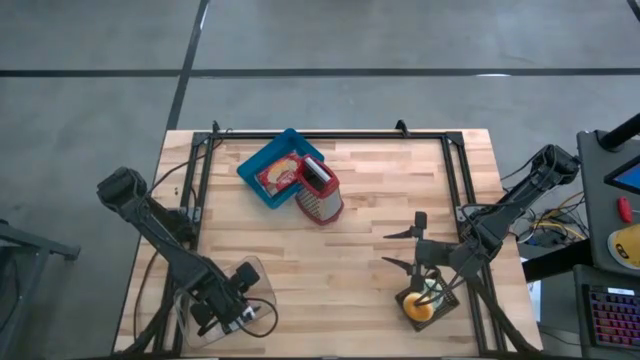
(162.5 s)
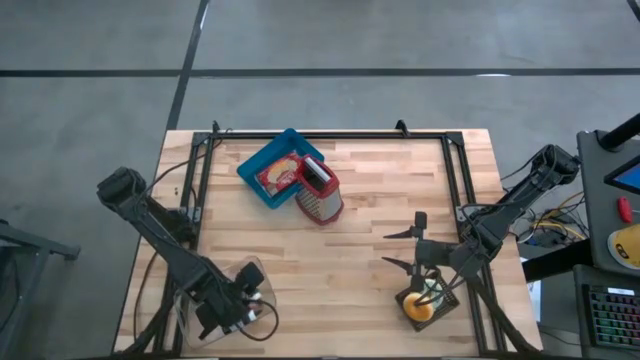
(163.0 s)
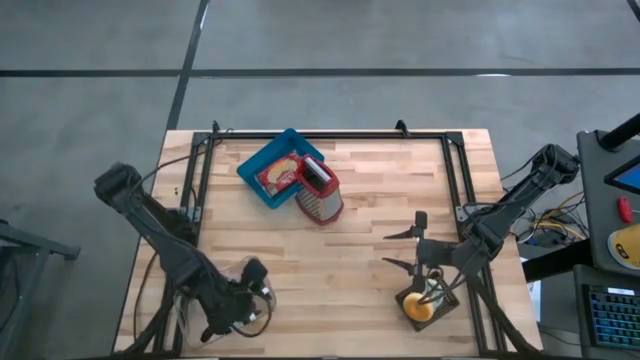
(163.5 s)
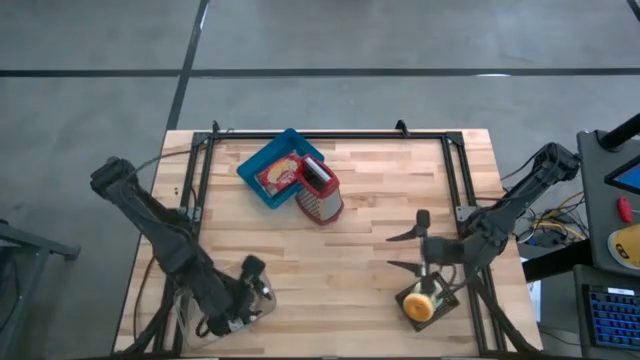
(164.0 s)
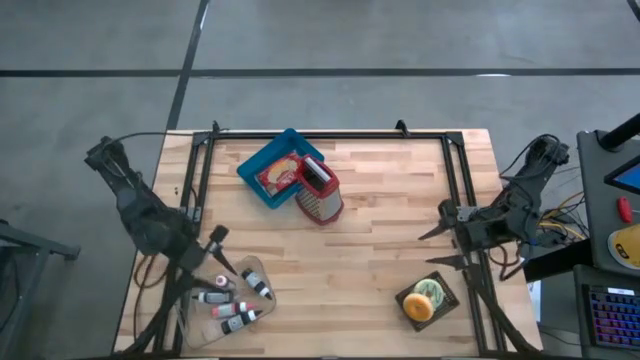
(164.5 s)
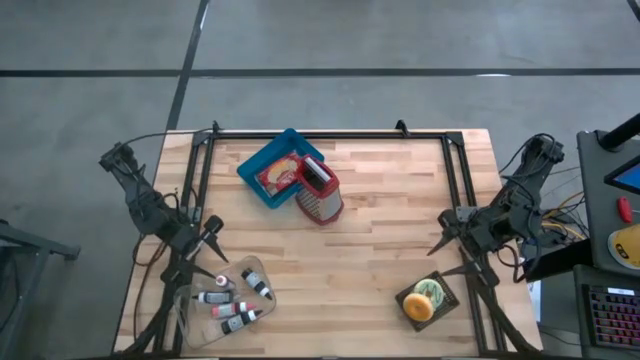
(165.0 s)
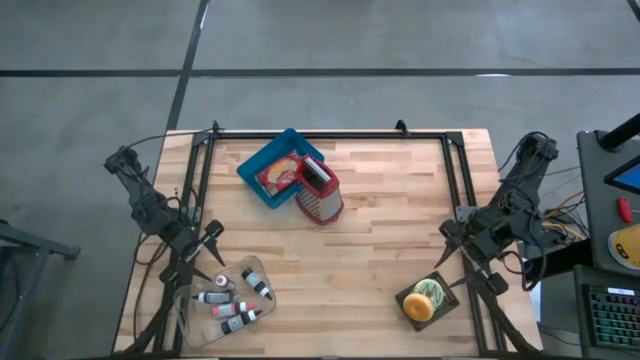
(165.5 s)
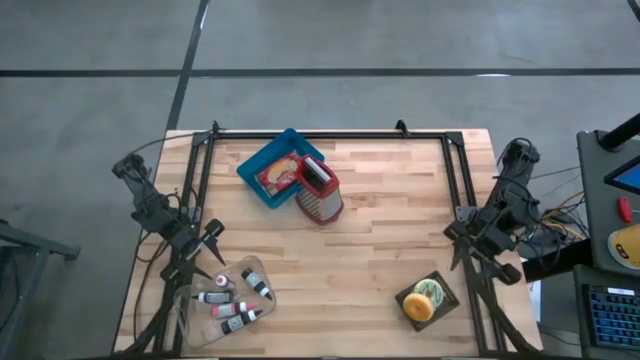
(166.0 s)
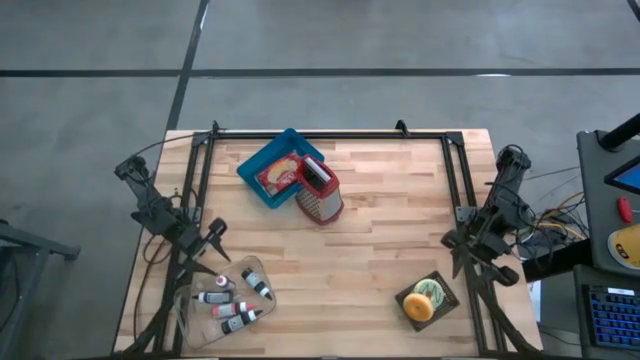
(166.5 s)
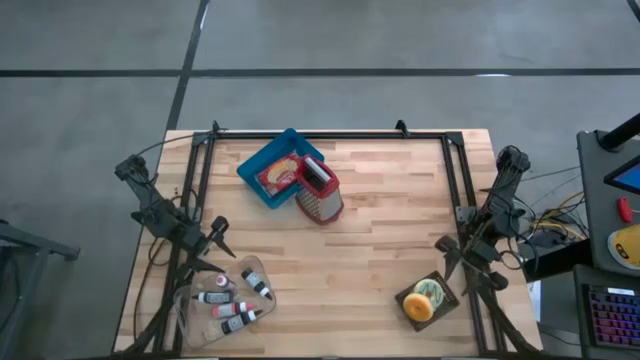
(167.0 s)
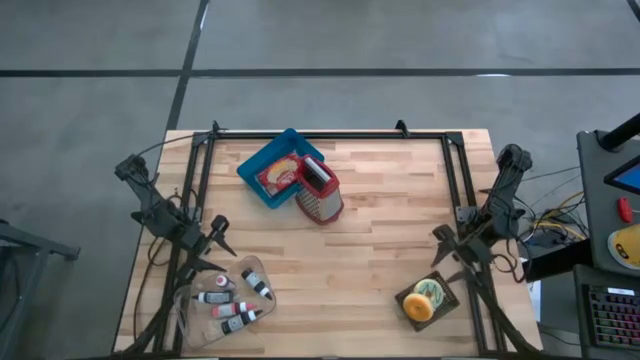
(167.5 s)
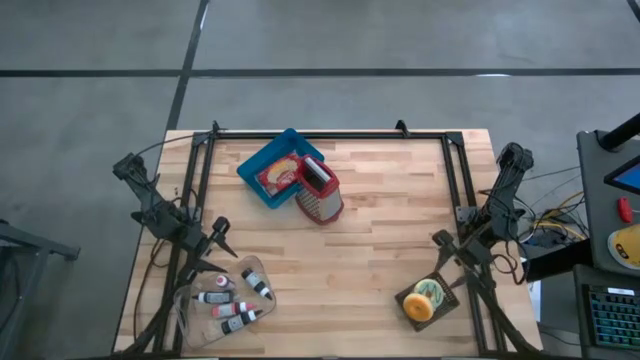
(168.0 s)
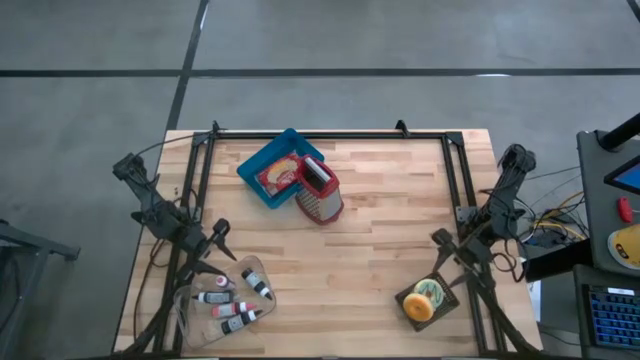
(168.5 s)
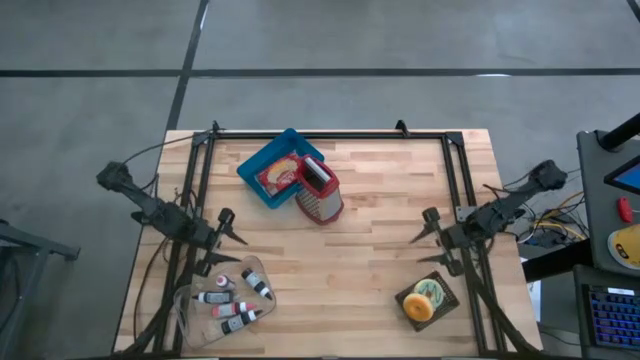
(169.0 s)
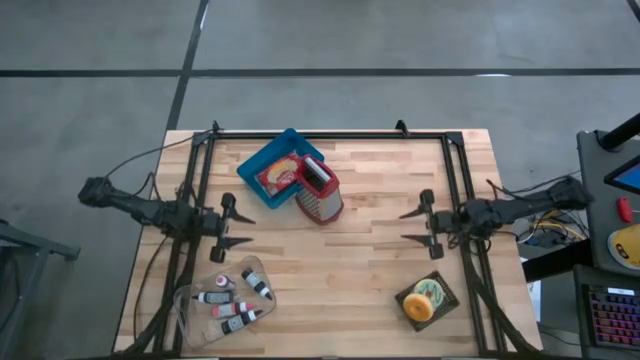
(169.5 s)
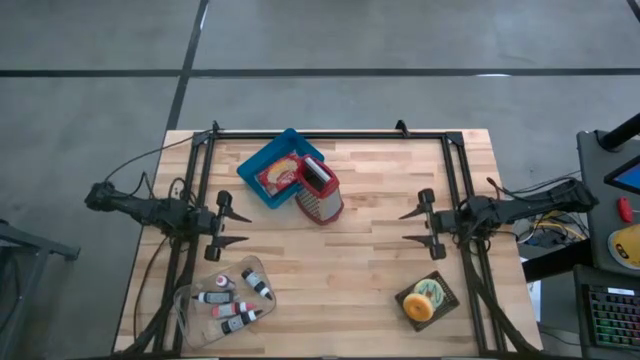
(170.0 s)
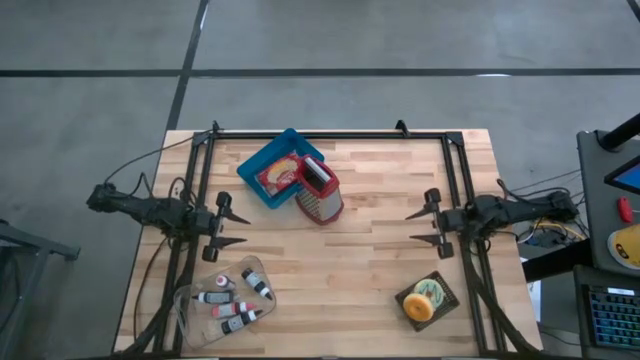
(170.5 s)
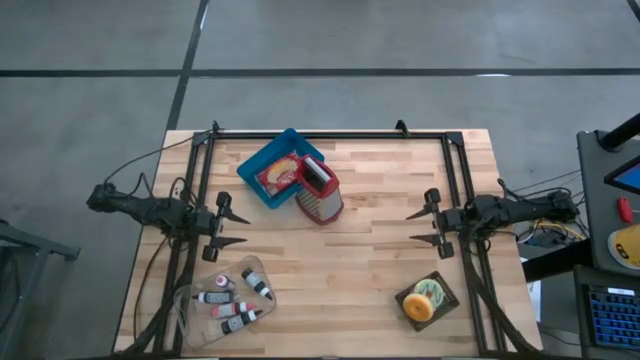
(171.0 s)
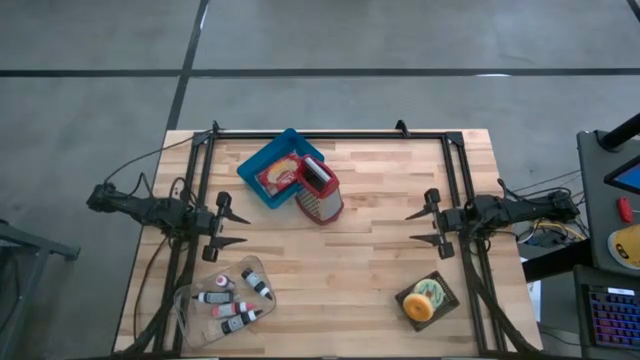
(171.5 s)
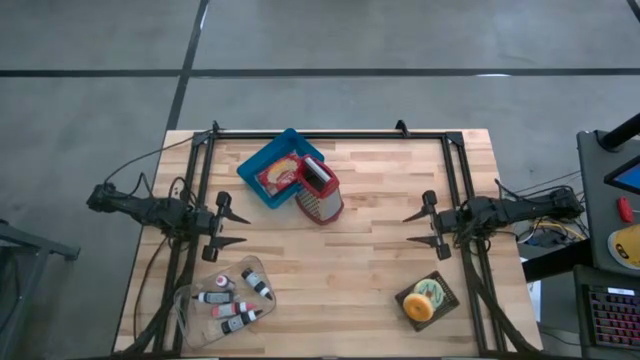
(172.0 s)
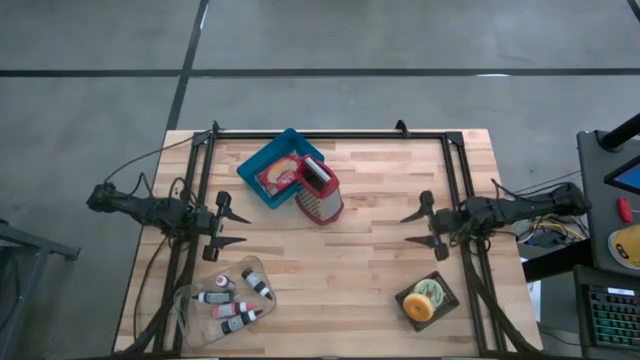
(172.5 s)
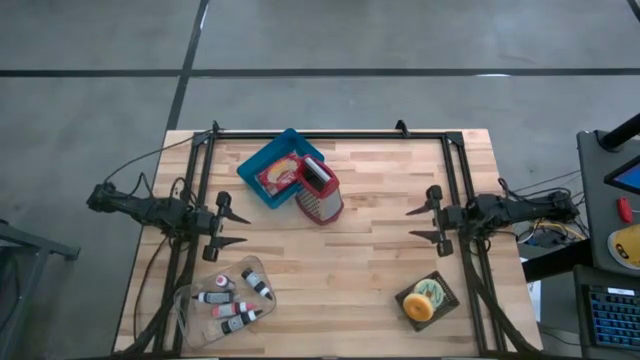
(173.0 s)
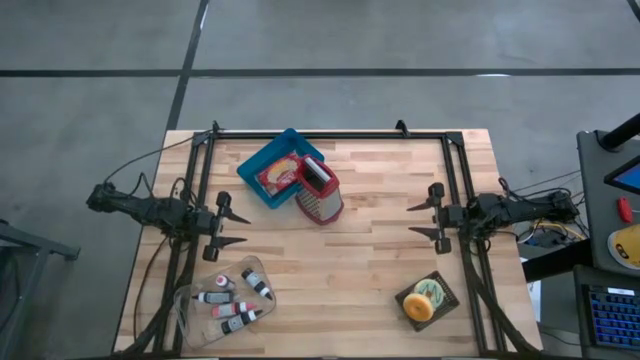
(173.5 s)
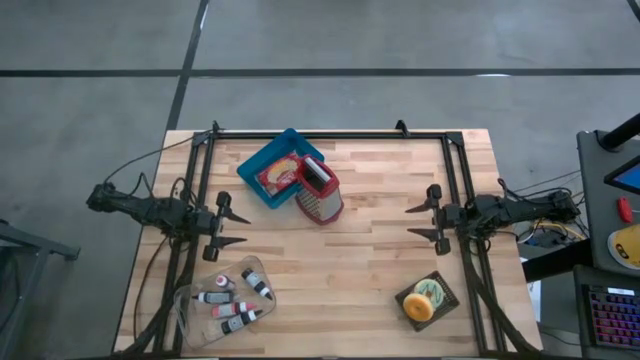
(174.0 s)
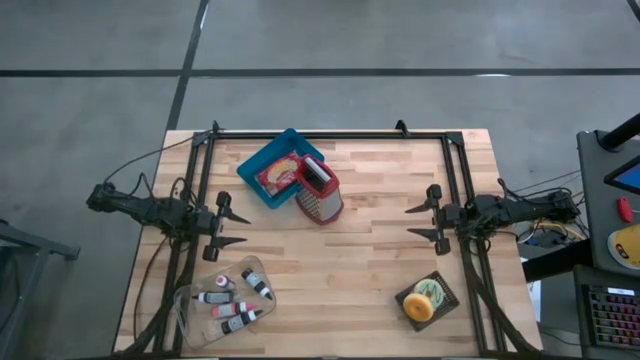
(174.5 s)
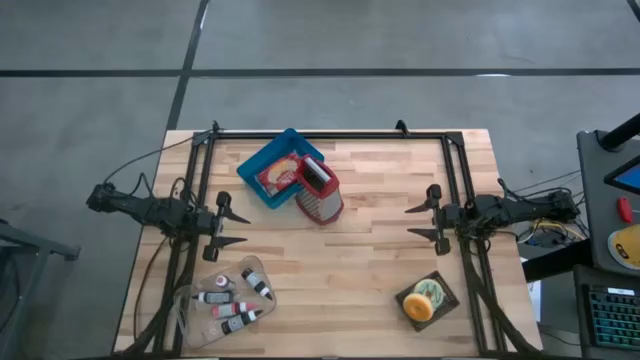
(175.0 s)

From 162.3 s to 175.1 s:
Return to Home Position
